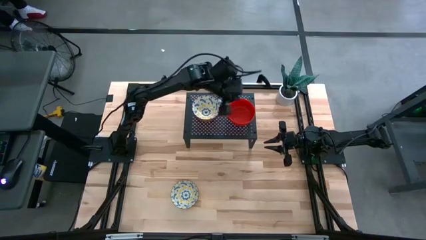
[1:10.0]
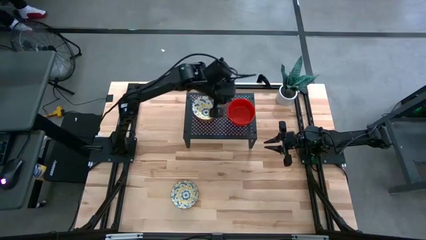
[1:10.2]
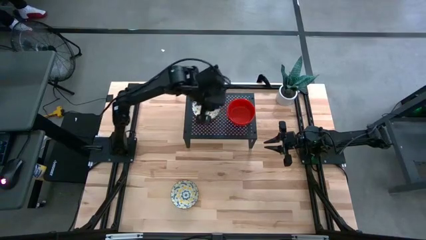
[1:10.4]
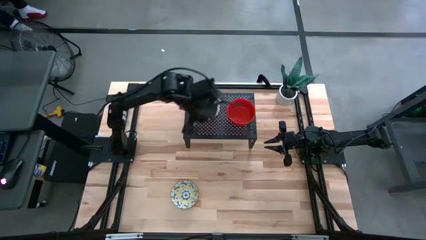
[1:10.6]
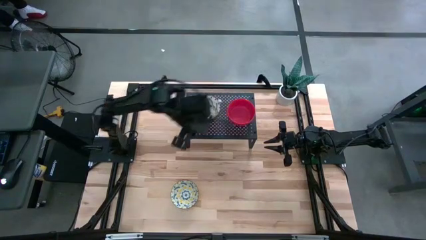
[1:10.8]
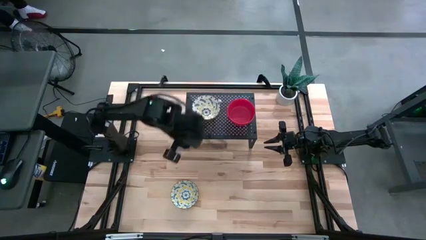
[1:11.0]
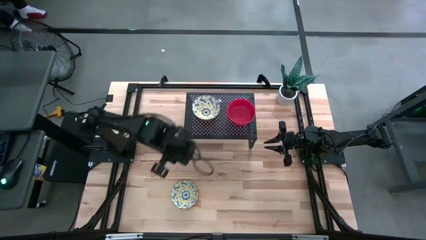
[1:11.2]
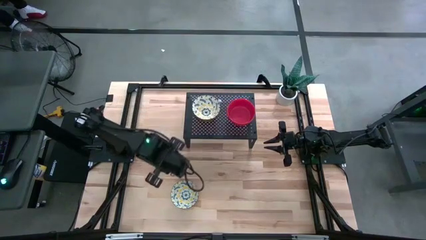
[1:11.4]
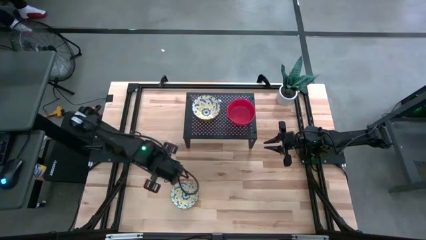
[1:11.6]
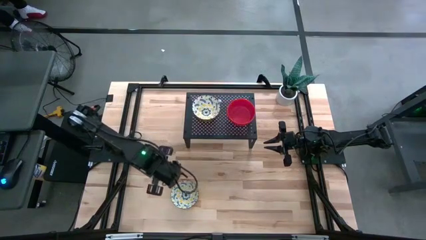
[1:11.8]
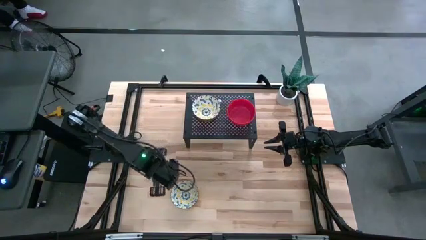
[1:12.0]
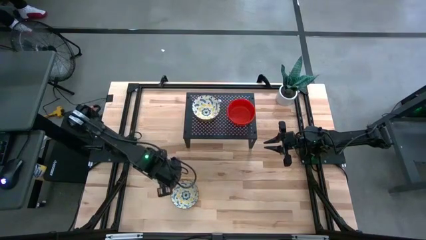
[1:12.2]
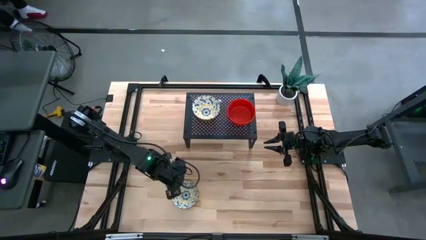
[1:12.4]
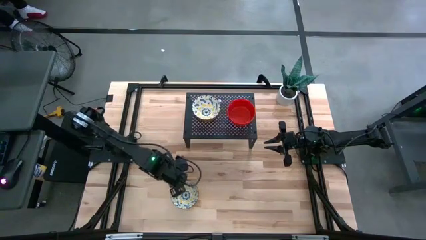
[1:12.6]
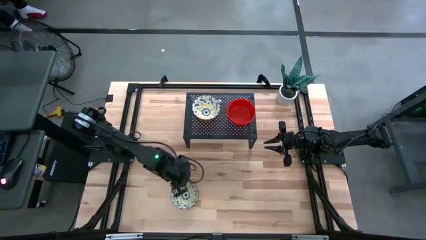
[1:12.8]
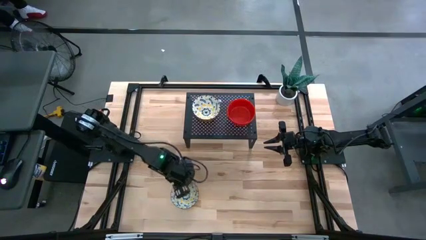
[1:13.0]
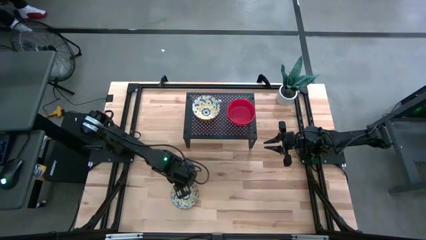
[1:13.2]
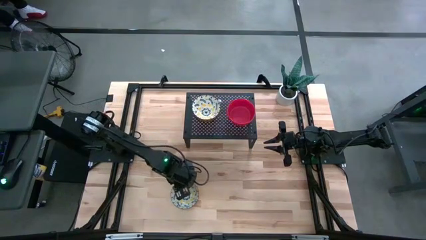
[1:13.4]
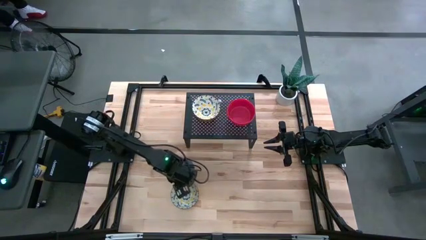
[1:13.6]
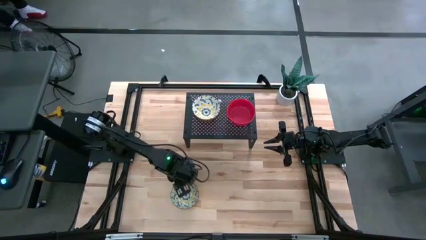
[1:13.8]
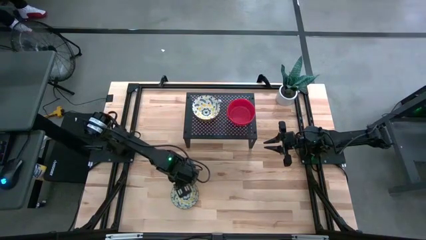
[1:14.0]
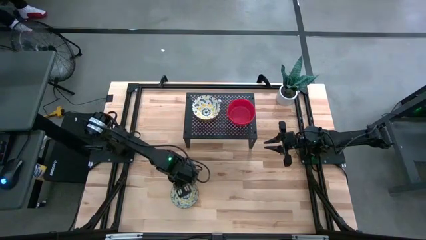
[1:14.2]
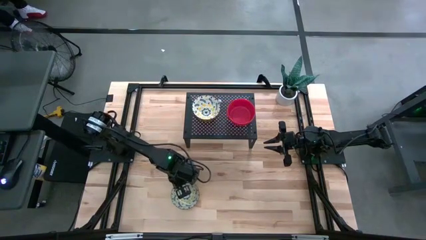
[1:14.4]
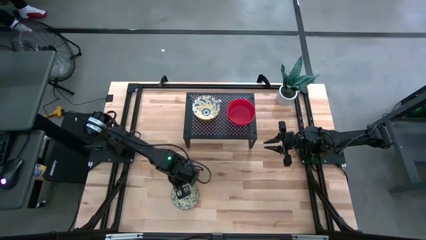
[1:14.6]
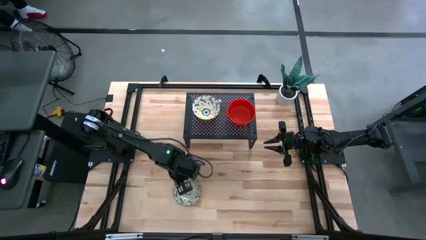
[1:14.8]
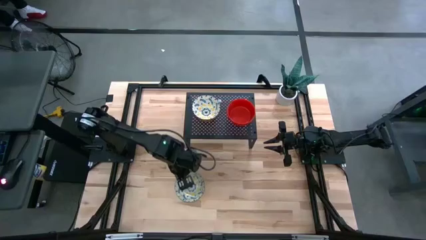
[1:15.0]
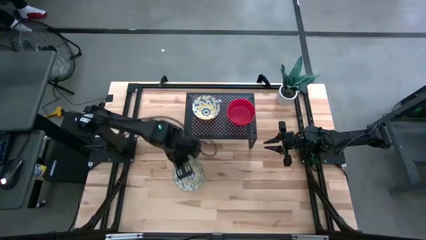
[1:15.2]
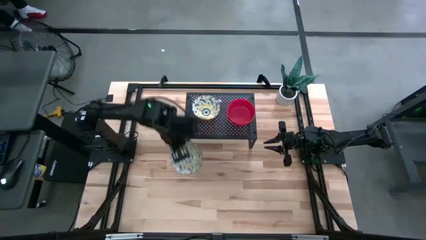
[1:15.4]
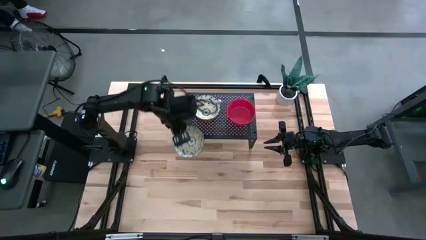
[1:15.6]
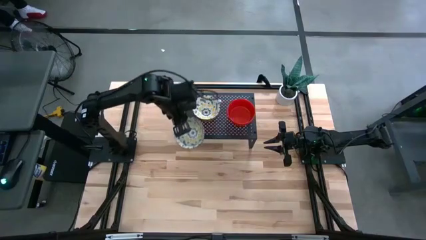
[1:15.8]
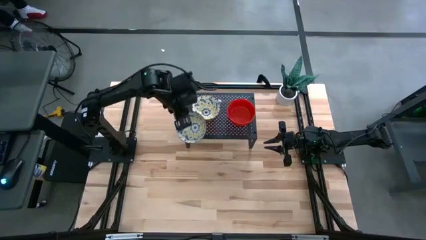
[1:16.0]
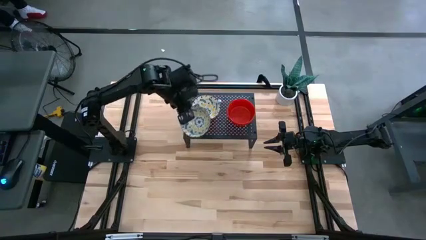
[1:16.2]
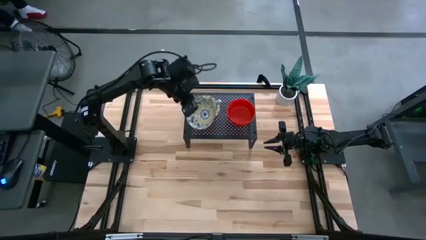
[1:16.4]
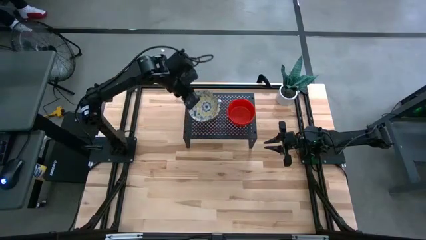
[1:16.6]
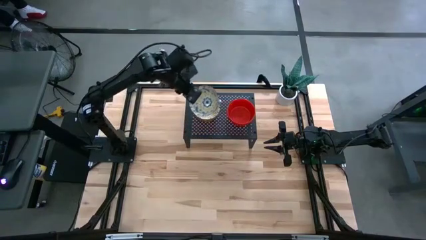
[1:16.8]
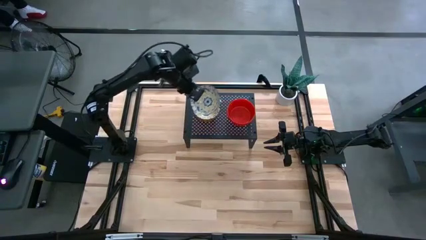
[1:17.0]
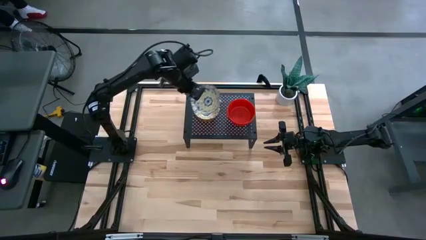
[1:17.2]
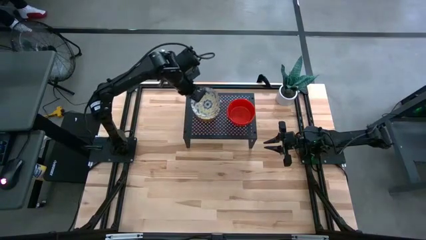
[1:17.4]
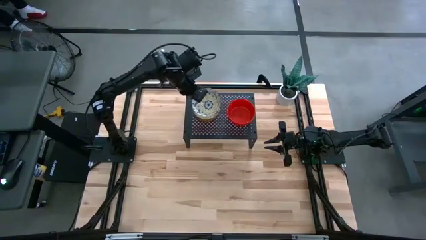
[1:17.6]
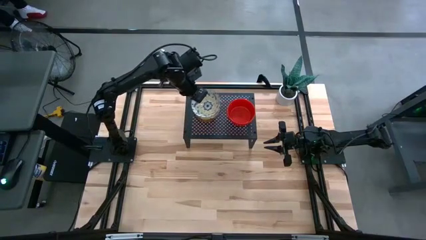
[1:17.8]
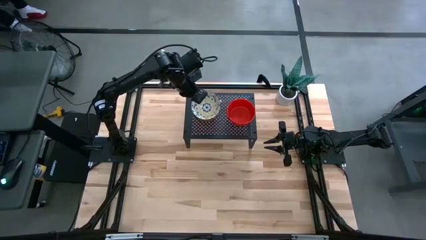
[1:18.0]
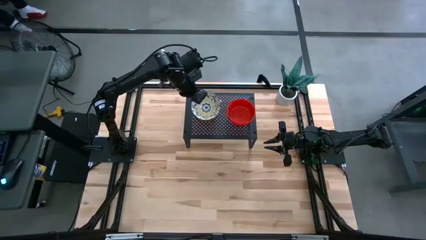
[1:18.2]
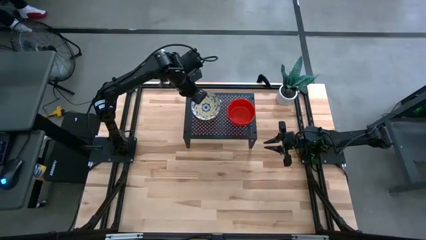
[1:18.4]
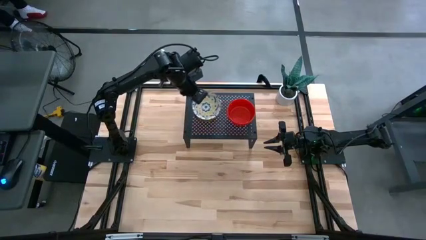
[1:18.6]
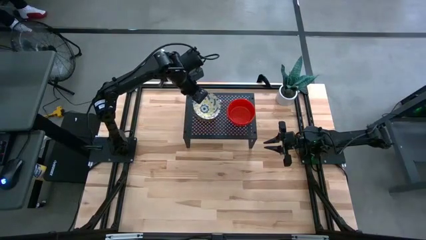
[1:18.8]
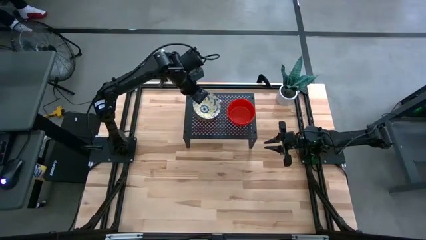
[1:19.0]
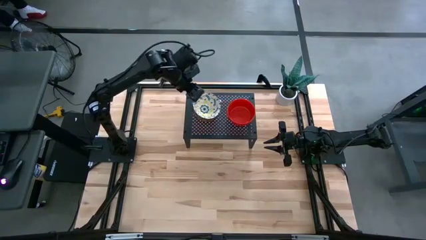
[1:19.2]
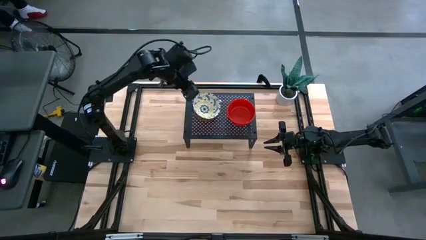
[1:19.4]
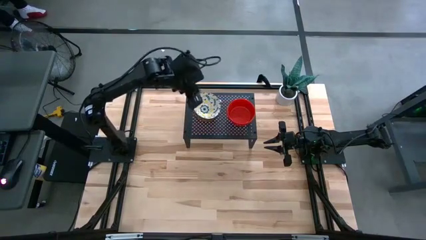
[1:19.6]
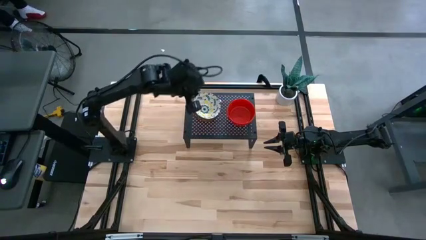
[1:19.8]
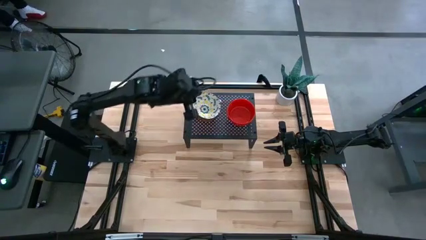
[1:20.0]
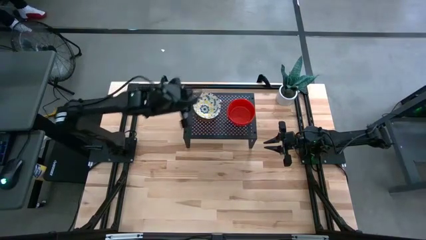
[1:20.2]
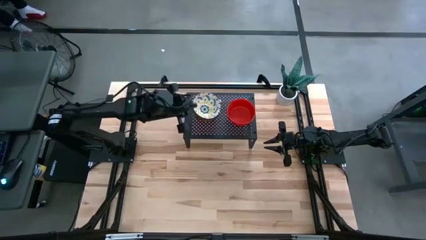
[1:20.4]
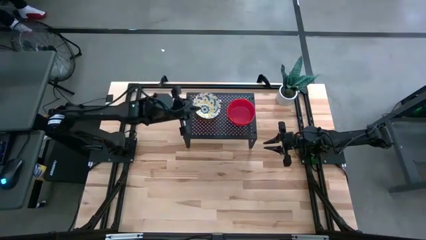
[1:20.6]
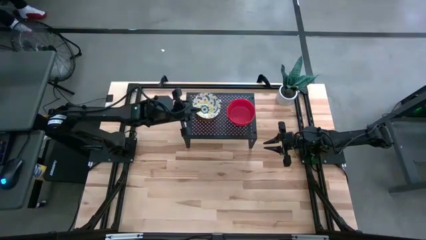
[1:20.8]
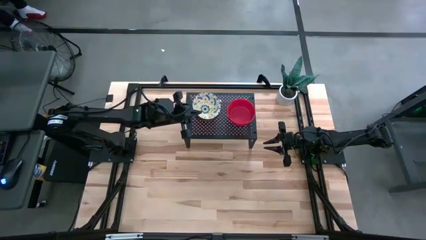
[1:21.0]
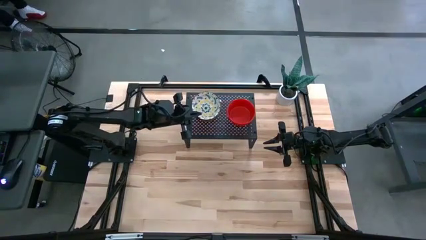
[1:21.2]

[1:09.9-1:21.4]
Task: Pick & Place Mini bowls
Stack the yellow patterned bowl on the yellow patterned bowl on the shelf

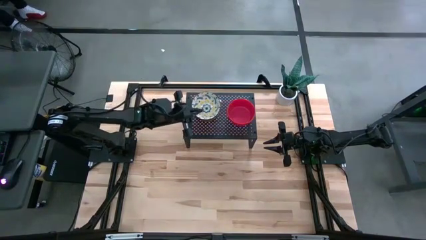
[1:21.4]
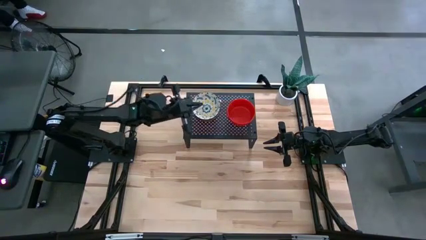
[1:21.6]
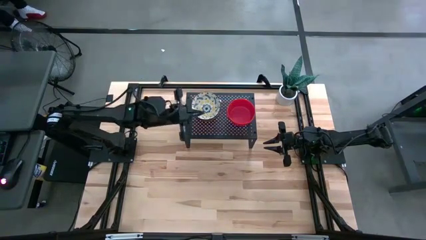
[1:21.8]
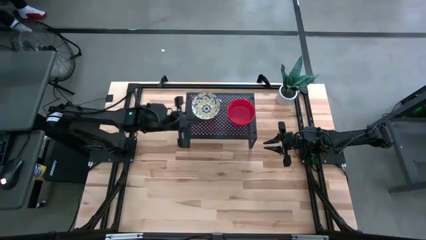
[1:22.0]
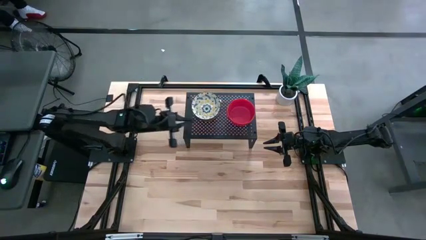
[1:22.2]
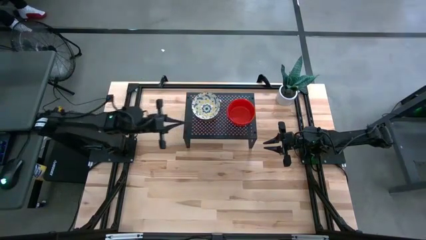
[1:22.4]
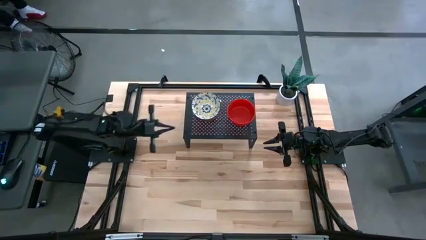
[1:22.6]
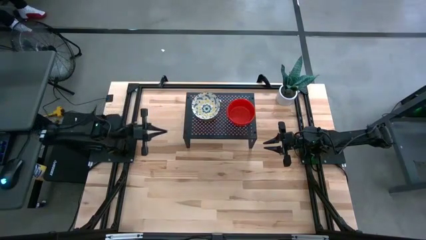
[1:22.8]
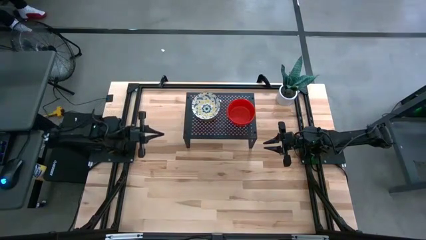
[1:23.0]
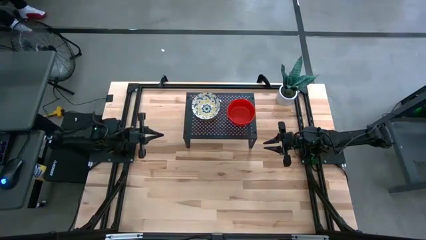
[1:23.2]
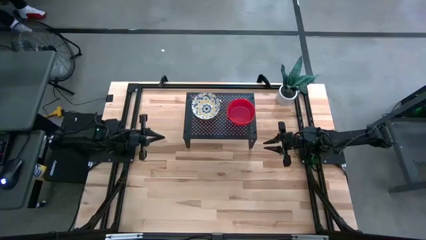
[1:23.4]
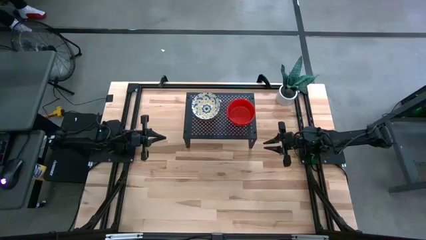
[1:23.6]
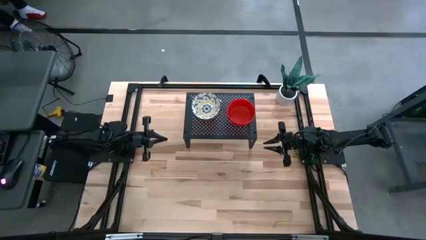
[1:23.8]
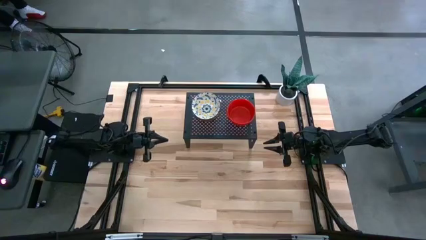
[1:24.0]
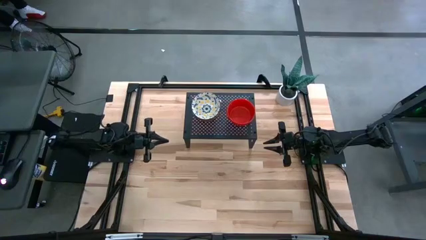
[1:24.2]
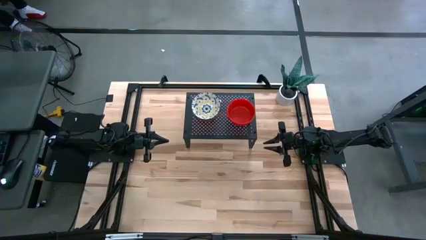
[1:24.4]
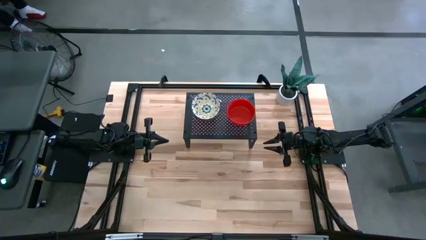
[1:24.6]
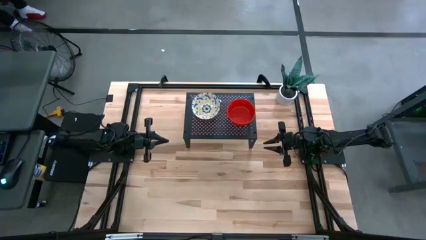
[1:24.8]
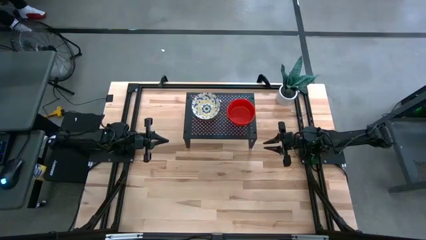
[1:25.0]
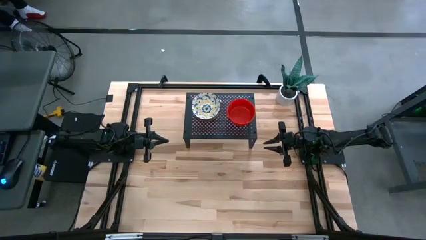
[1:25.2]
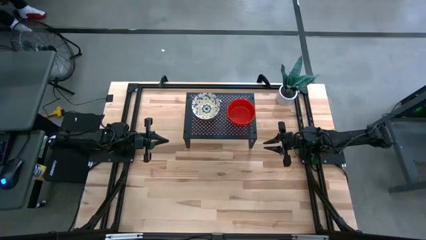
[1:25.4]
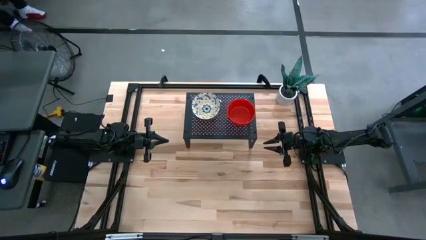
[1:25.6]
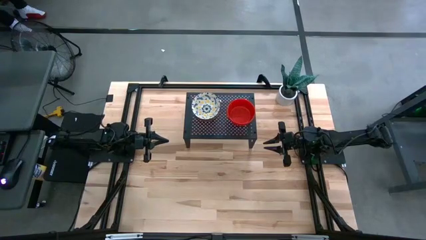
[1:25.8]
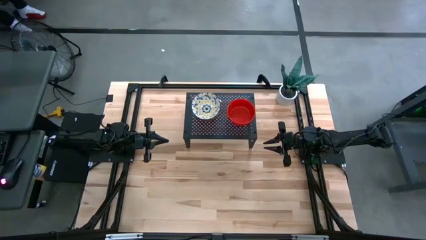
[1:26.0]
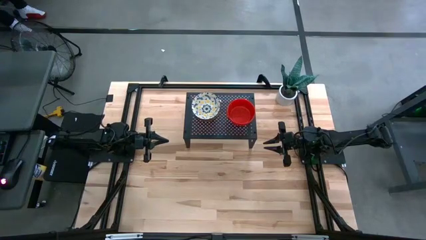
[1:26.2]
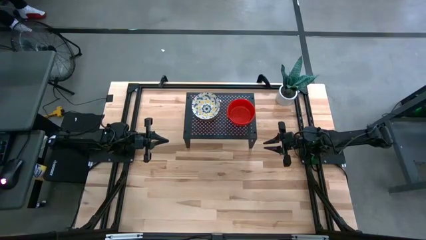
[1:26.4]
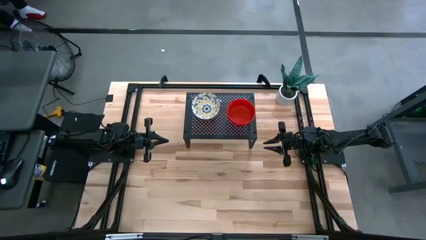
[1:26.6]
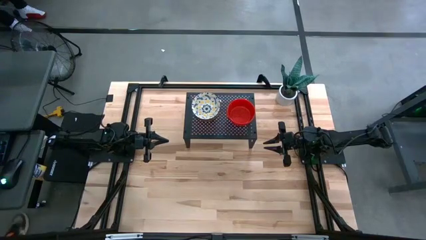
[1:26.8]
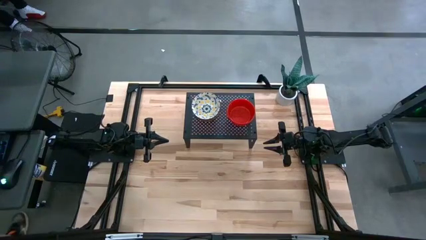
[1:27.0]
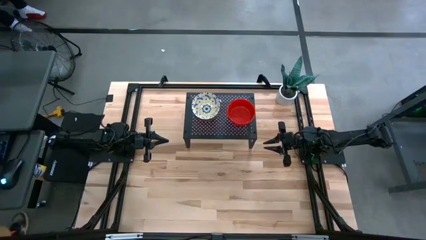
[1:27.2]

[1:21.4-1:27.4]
Return to Home Position
